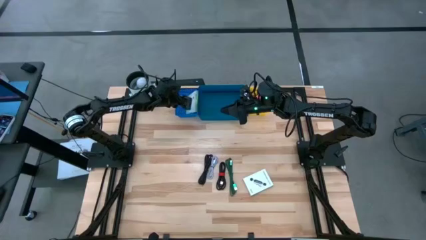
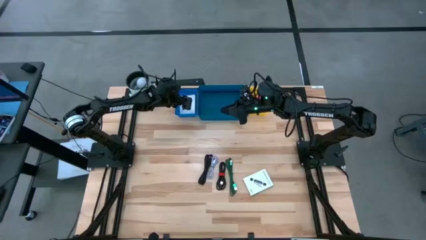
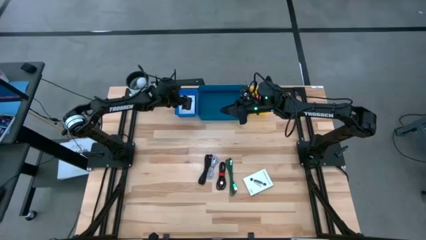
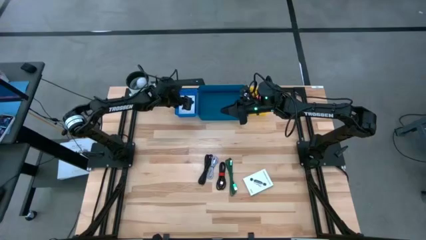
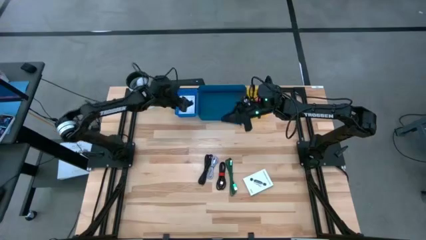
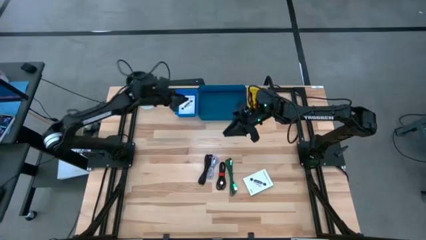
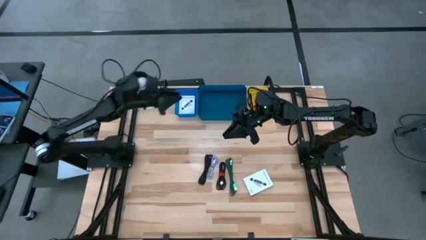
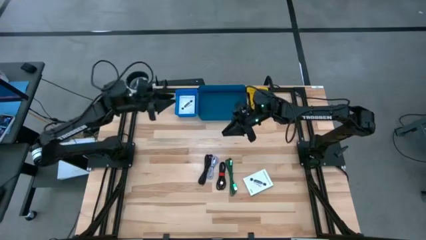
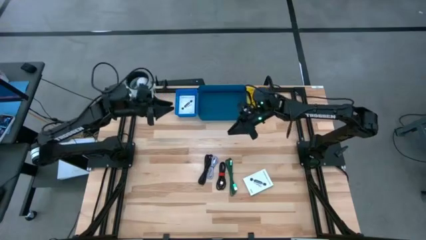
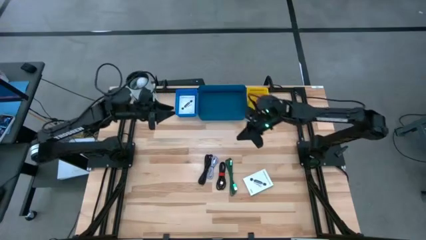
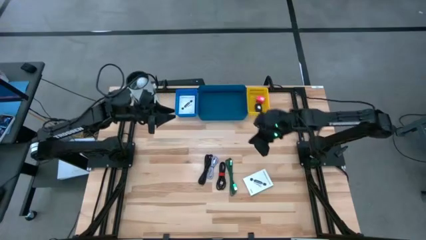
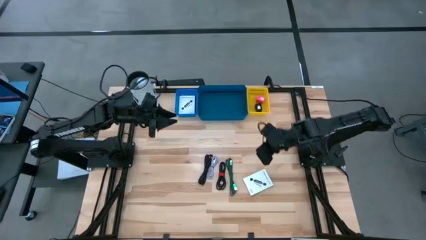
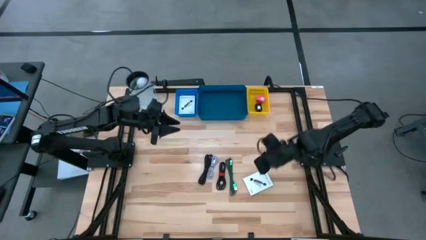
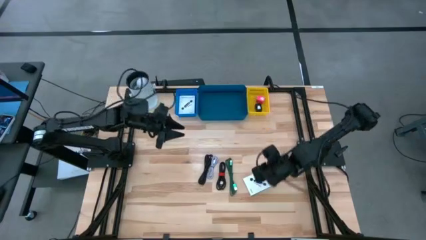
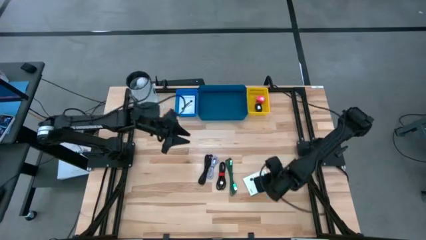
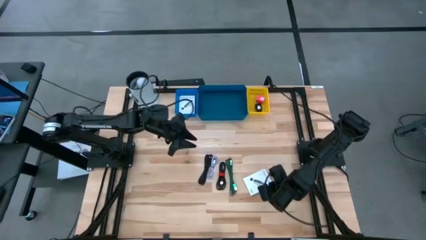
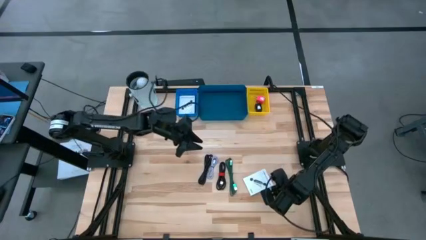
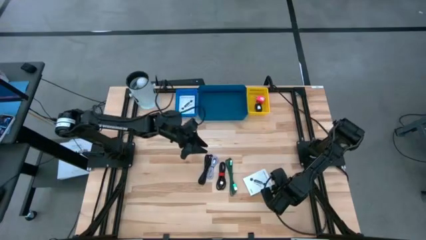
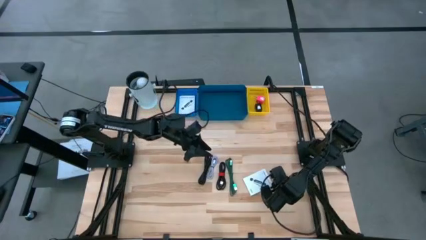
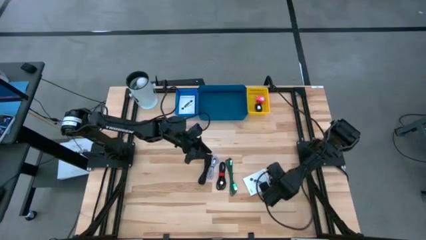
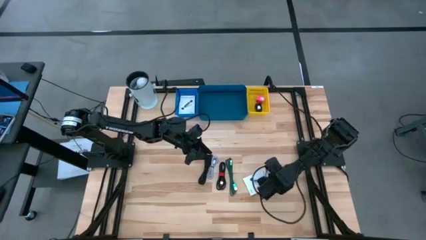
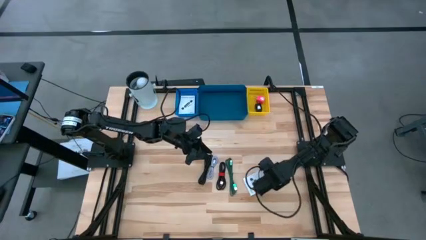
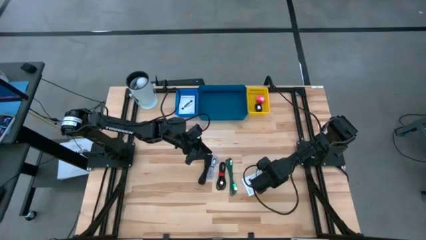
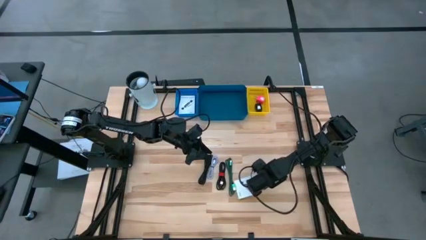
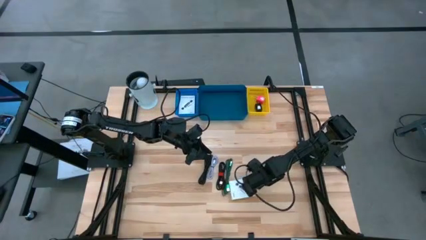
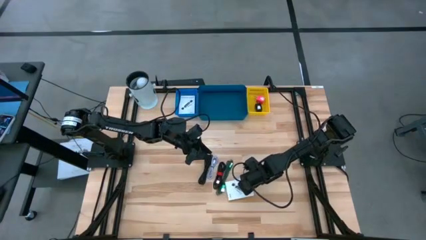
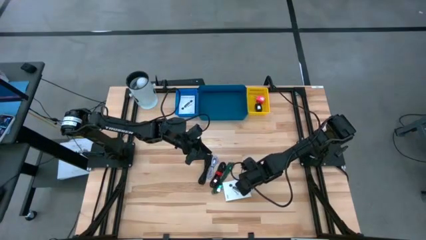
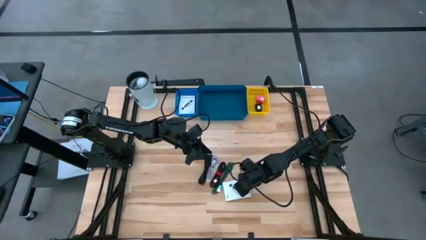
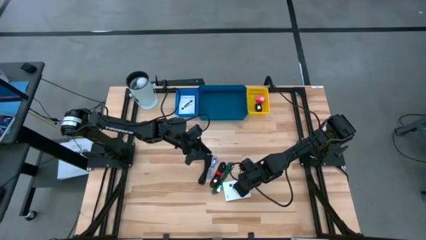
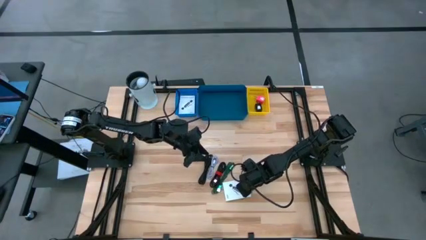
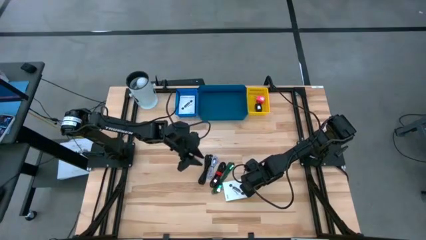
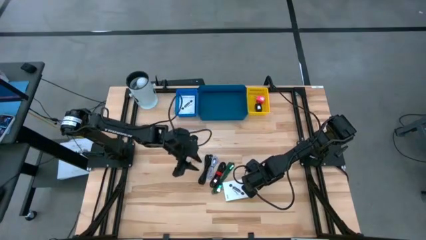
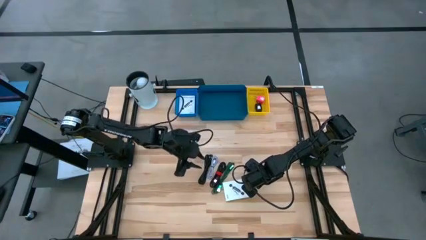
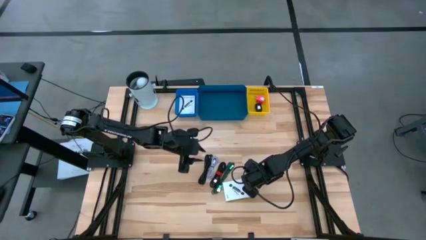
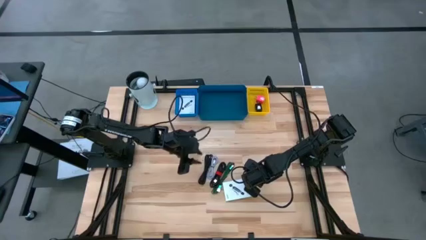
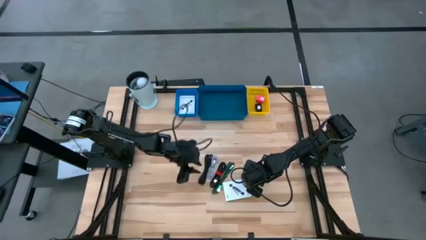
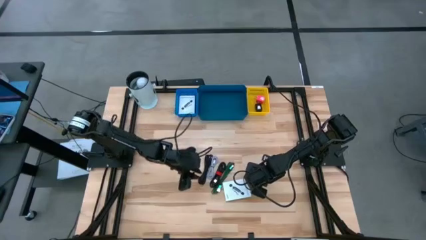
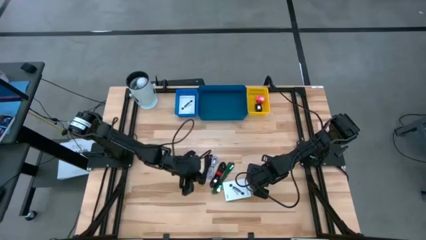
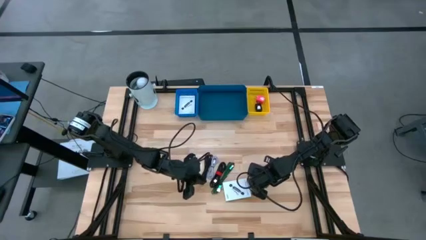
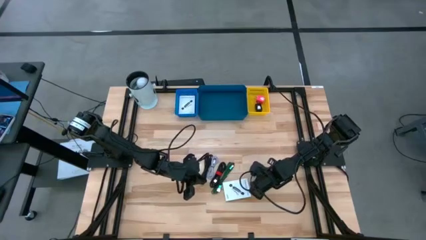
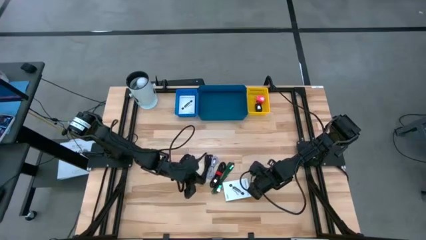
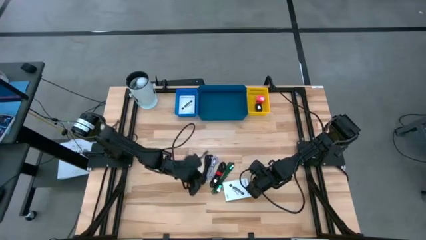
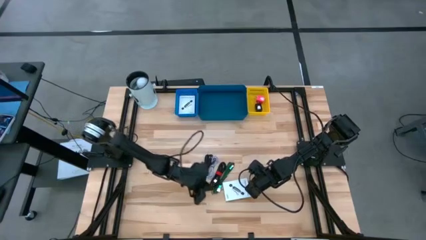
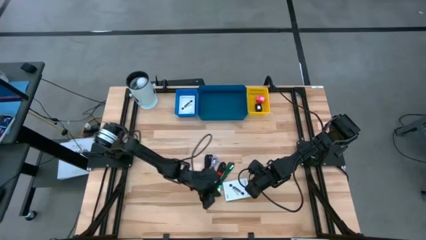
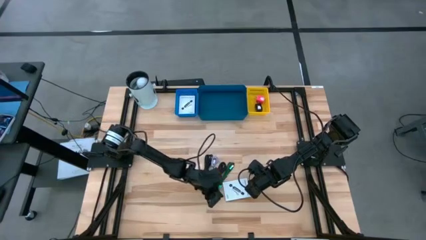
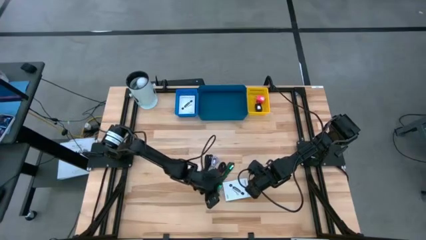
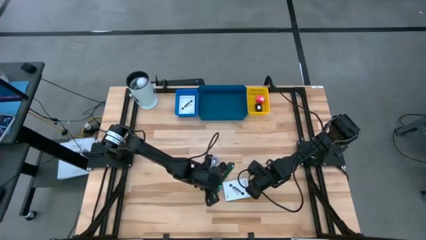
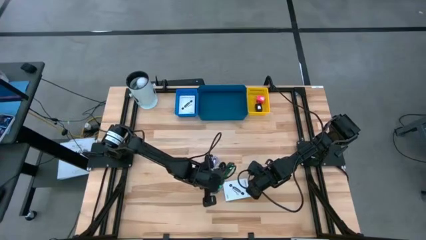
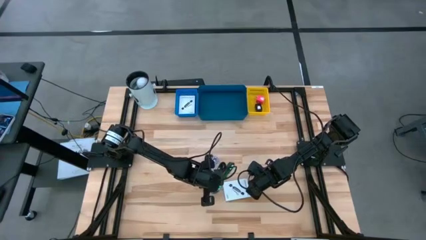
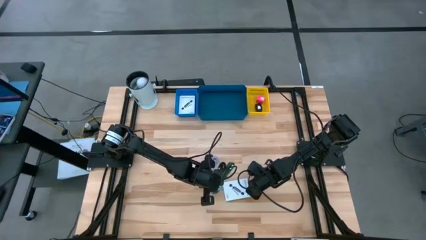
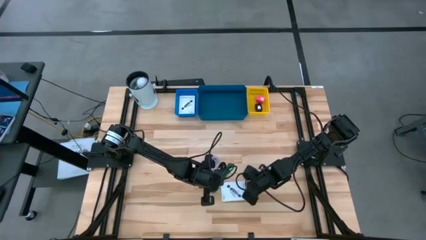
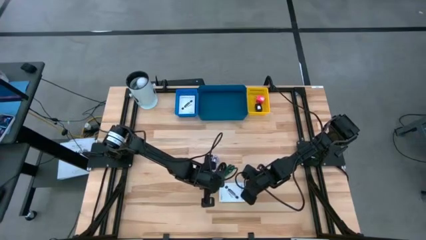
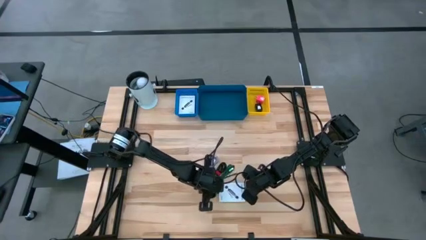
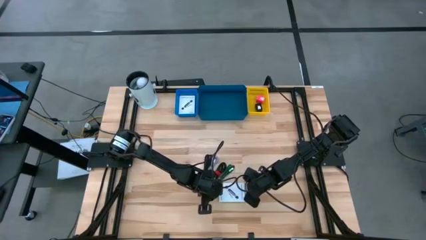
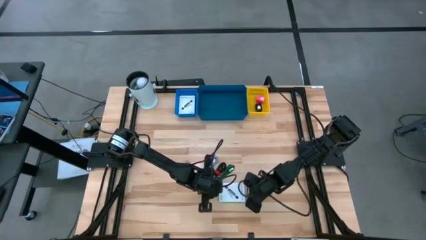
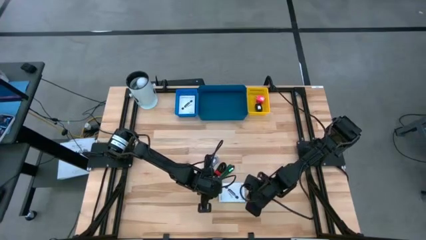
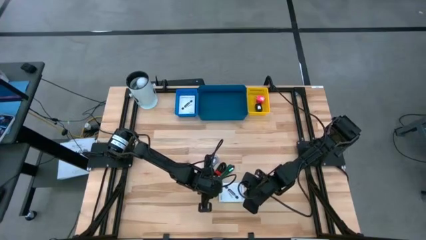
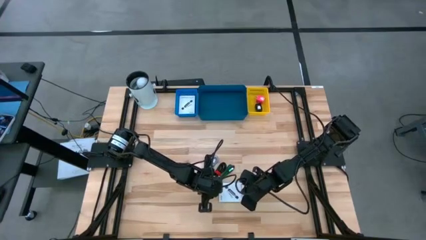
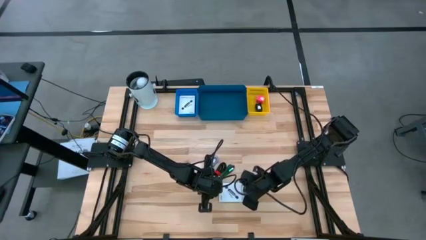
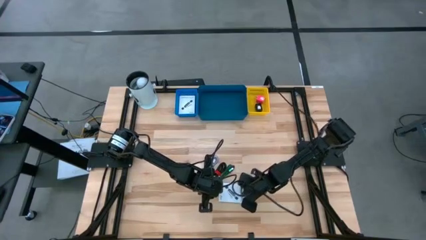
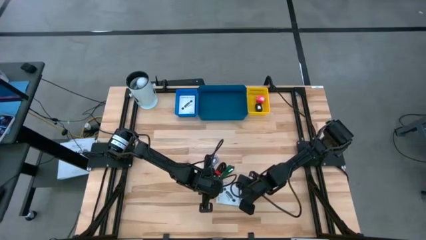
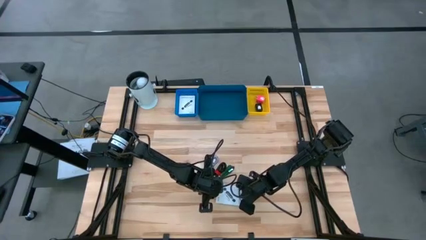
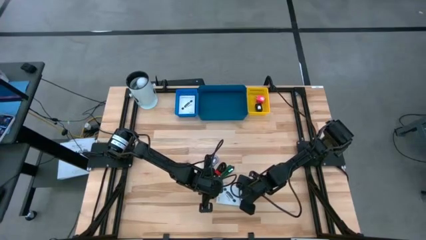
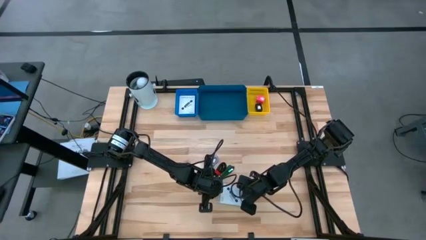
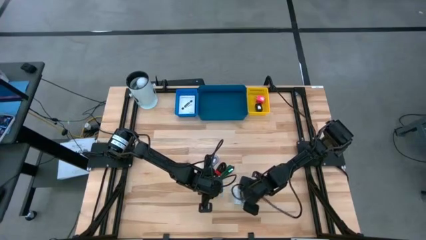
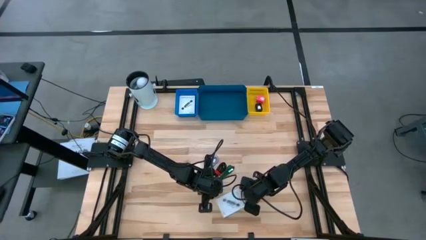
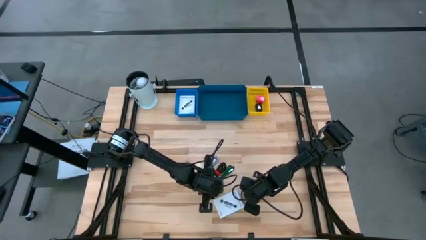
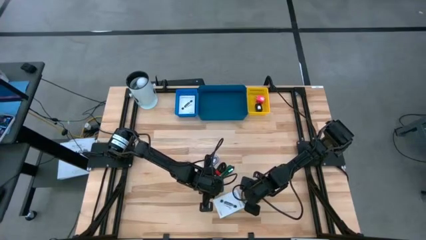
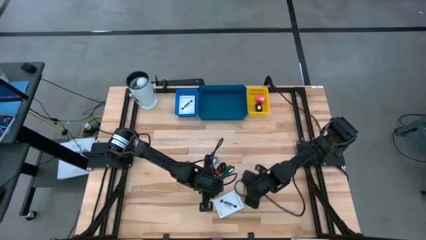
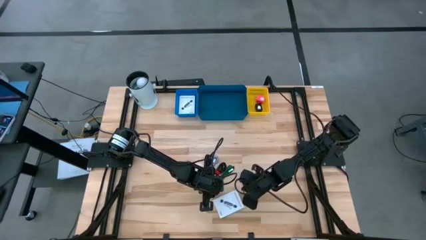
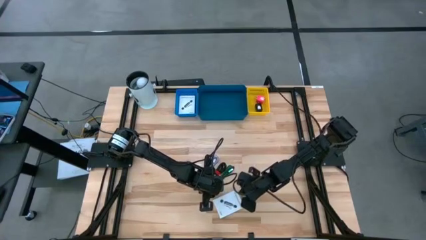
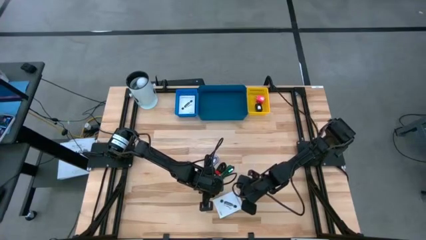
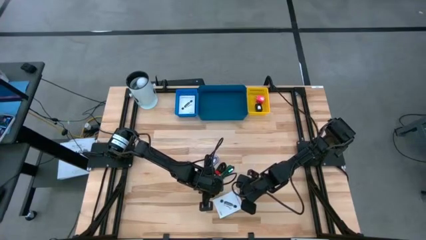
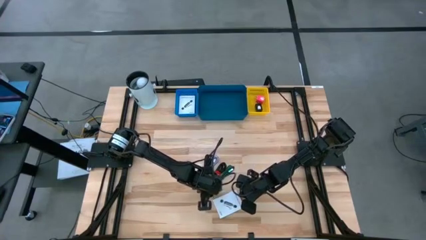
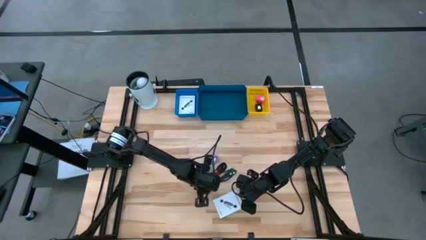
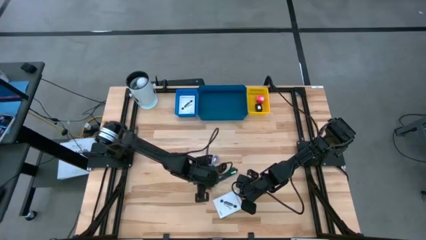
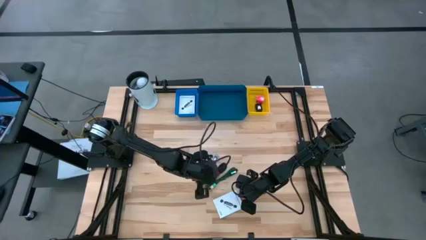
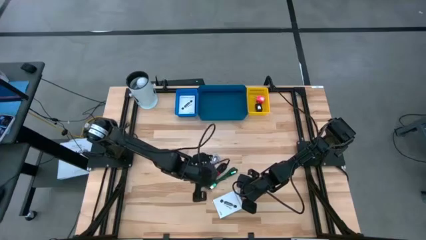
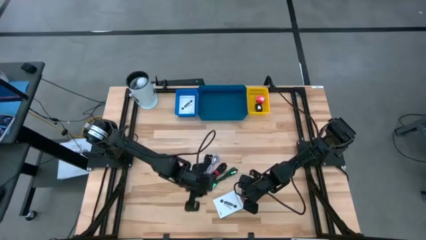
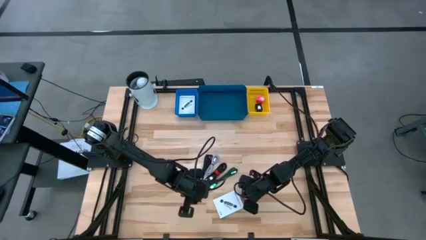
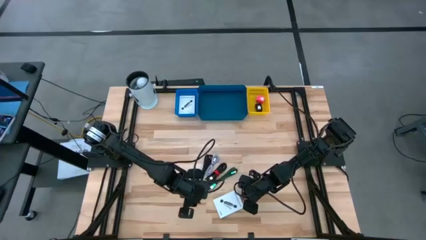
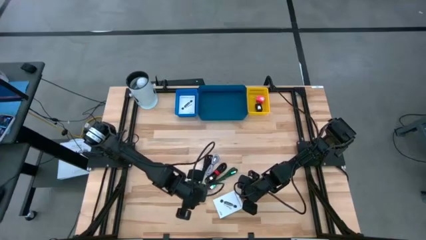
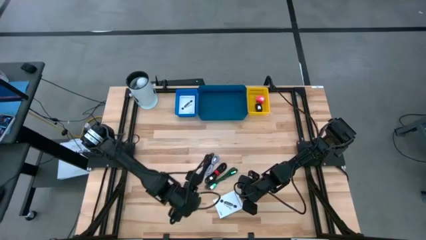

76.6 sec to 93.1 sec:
Task: Pick and place items into bin
Put the card reader box into the blue basket
